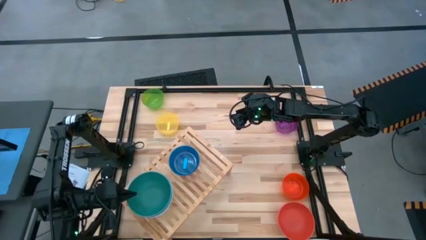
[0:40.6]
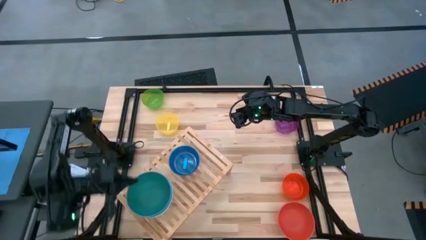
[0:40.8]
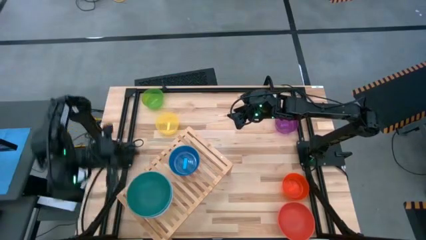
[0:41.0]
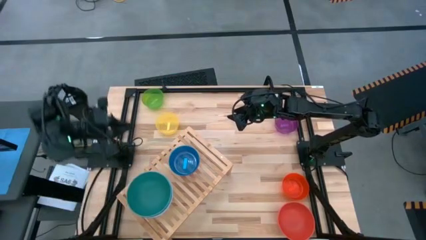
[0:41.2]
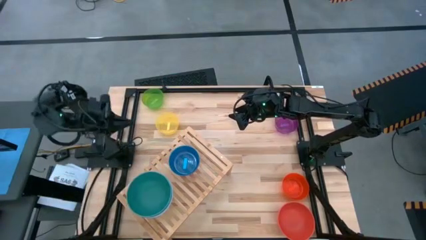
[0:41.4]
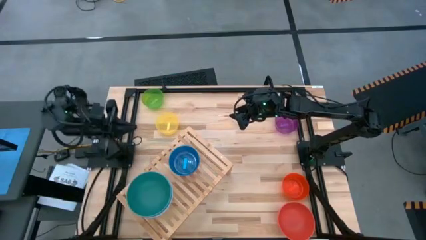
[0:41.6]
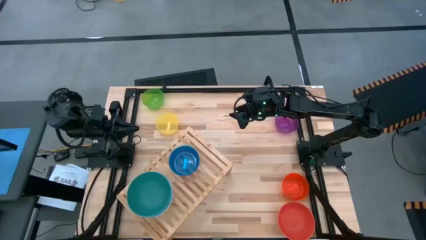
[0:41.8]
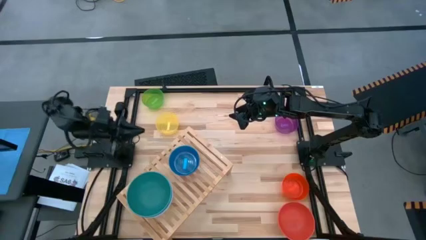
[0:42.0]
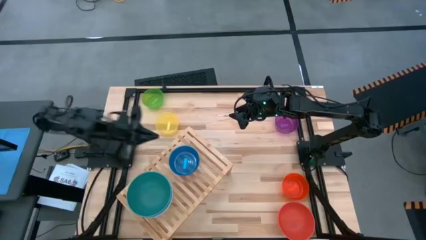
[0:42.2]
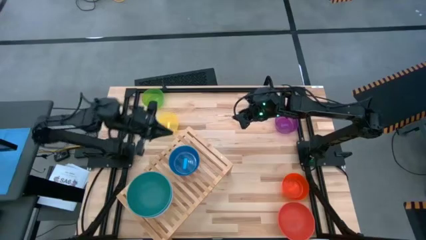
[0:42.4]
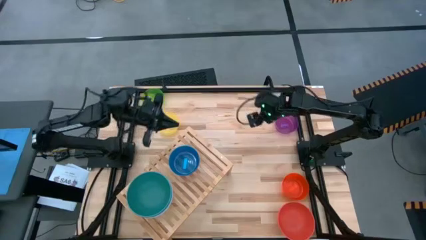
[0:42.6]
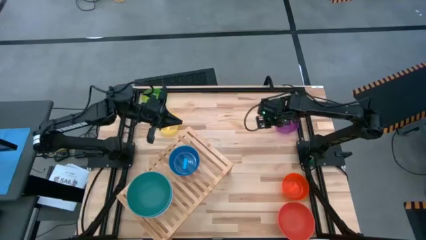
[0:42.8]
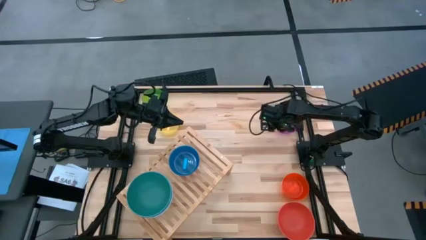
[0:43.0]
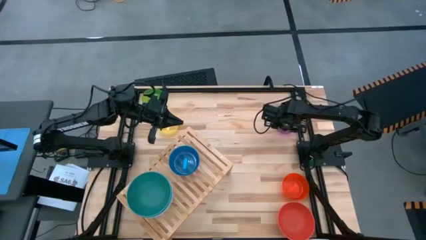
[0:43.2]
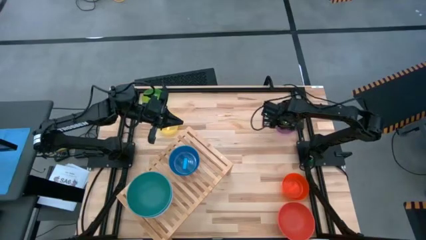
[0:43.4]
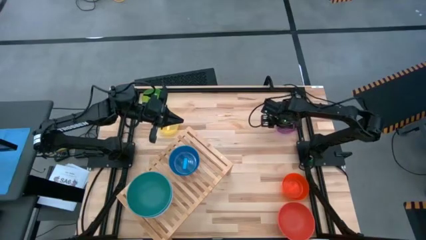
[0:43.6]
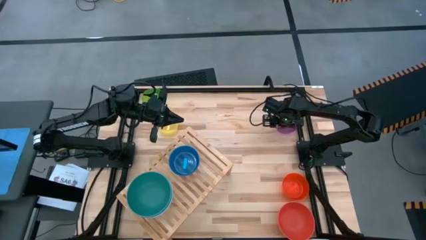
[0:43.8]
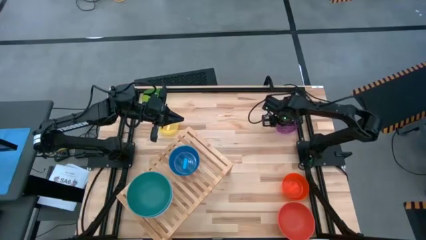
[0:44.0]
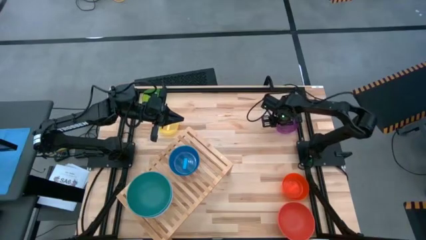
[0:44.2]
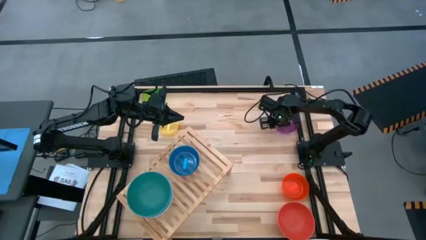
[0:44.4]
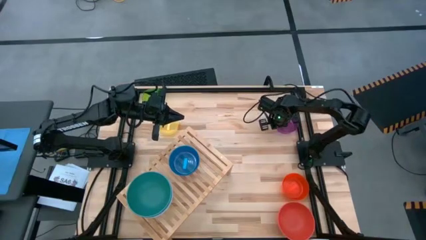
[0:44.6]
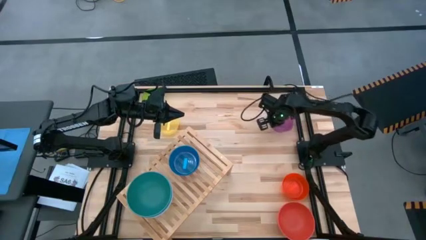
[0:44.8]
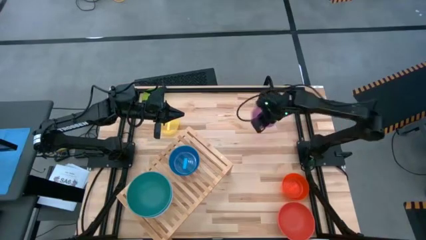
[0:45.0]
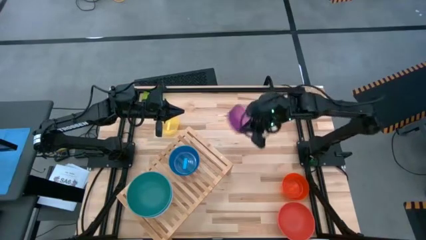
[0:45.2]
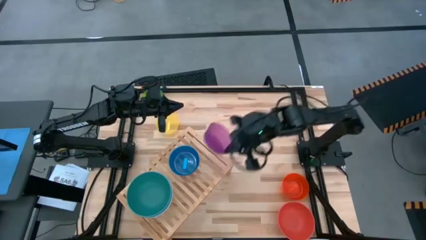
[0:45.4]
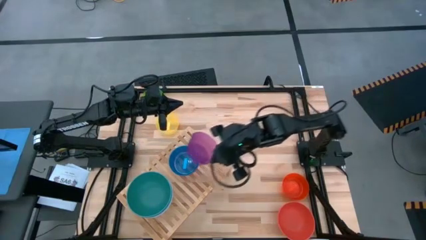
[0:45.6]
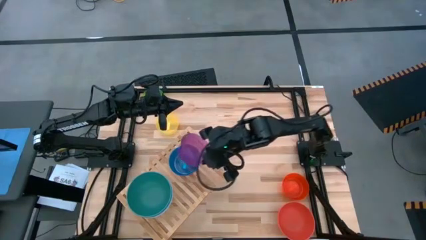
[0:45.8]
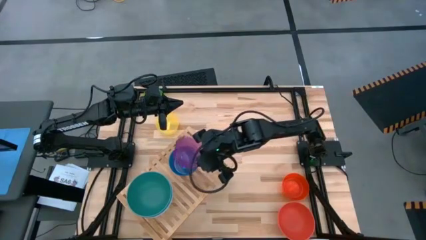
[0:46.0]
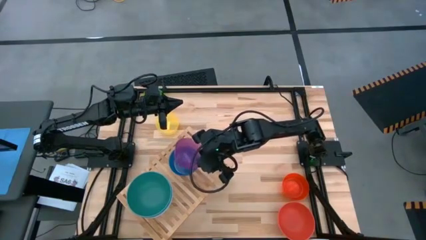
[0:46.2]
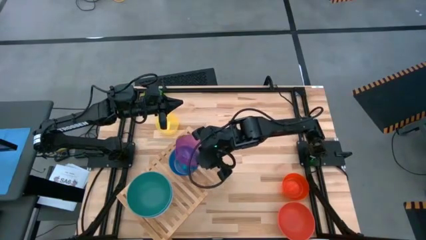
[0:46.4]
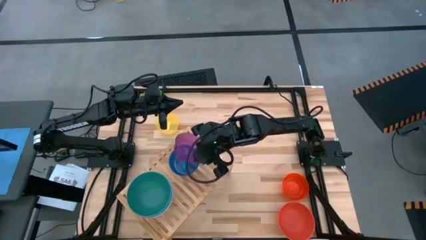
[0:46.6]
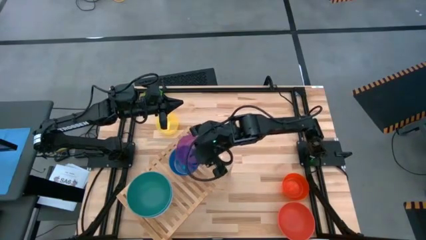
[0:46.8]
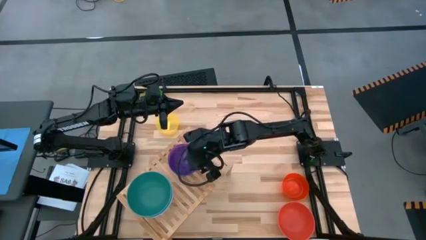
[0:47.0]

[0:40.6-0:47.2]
Task: Place and stack bowls onto a shelf
Stack the small violet bowl on the shelf on top of the small blue bowl on the shelf

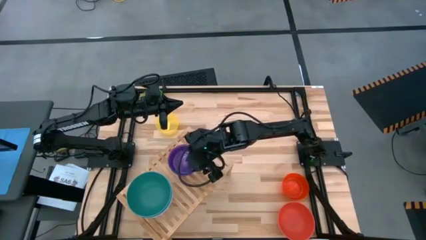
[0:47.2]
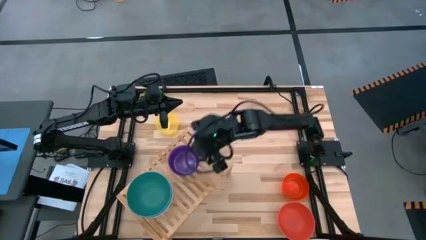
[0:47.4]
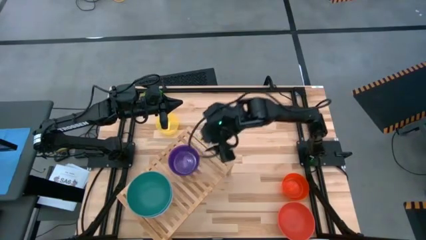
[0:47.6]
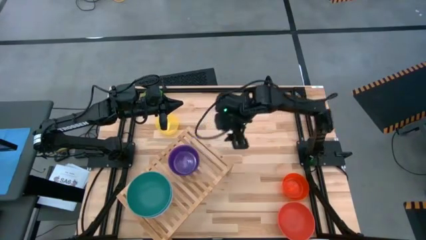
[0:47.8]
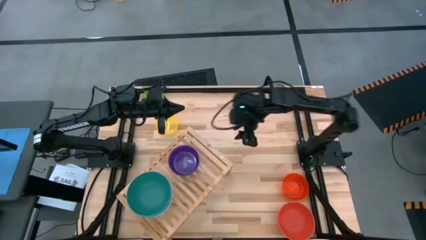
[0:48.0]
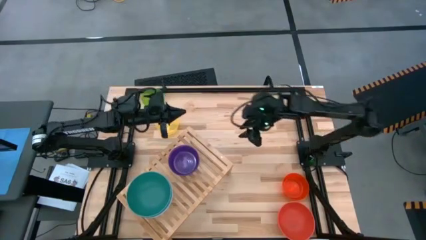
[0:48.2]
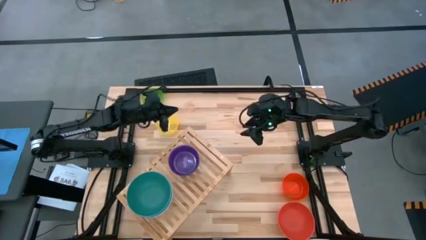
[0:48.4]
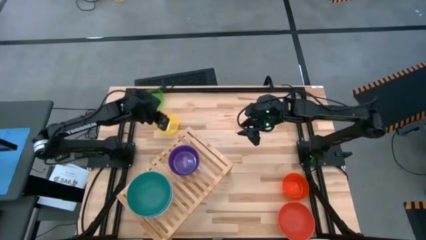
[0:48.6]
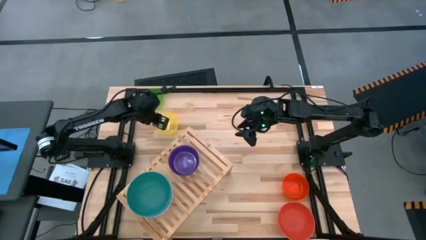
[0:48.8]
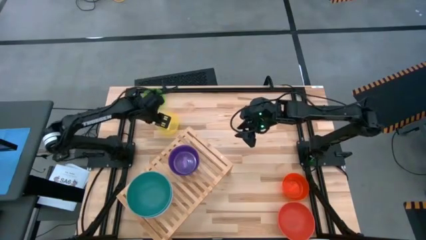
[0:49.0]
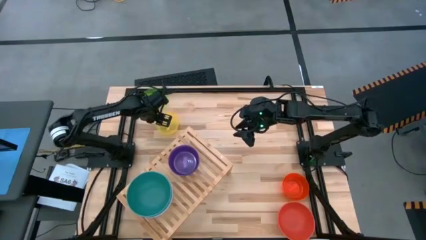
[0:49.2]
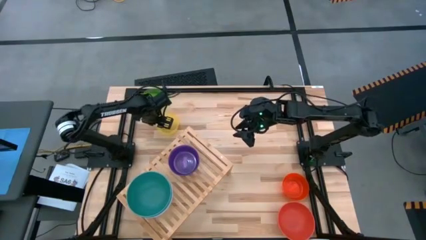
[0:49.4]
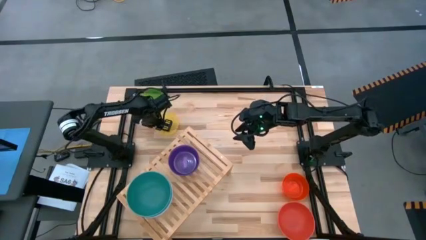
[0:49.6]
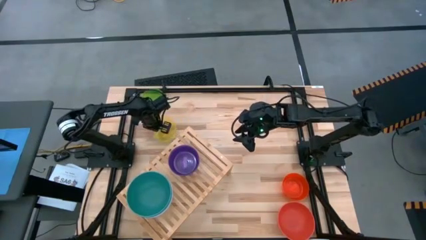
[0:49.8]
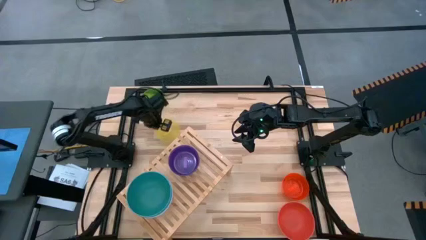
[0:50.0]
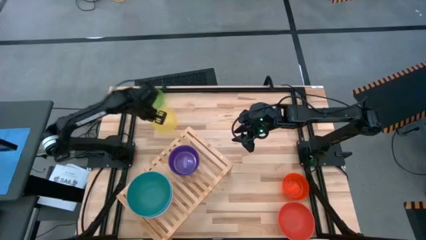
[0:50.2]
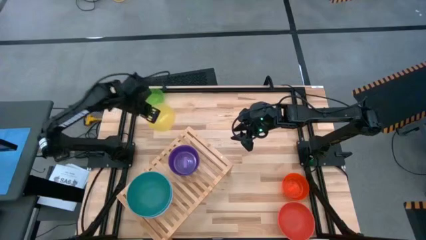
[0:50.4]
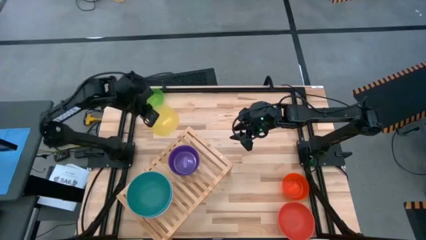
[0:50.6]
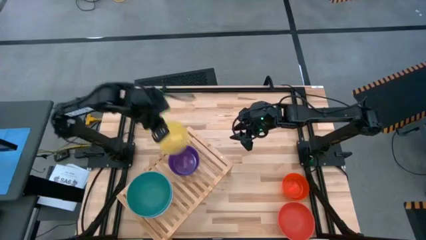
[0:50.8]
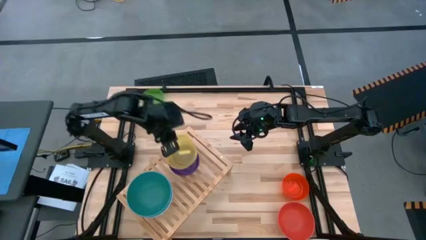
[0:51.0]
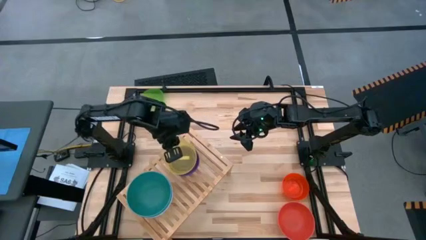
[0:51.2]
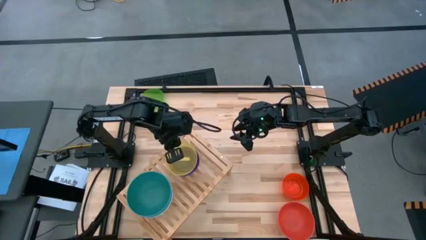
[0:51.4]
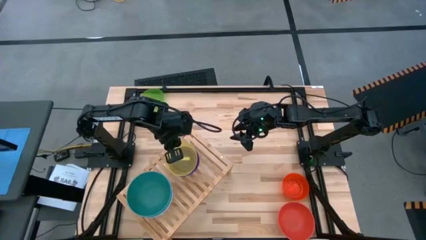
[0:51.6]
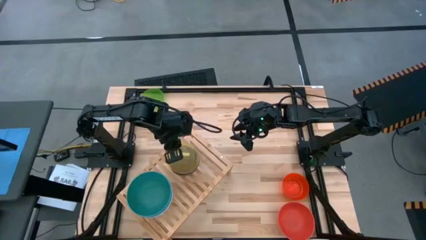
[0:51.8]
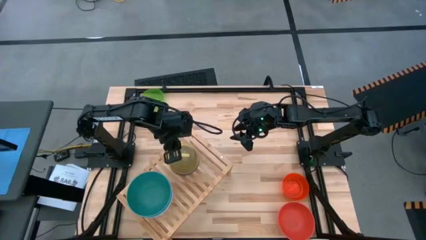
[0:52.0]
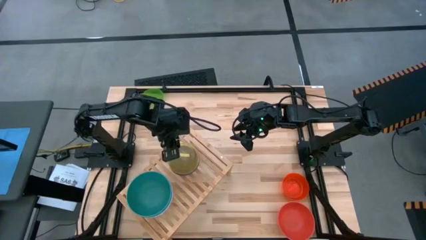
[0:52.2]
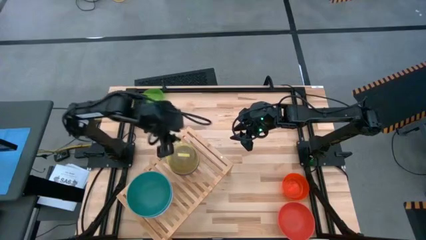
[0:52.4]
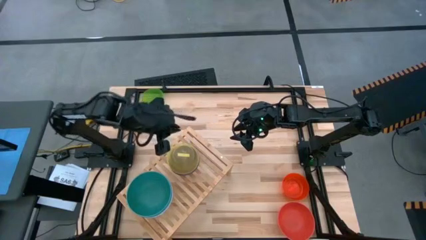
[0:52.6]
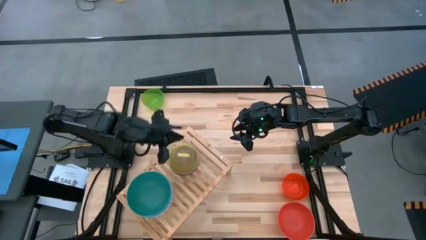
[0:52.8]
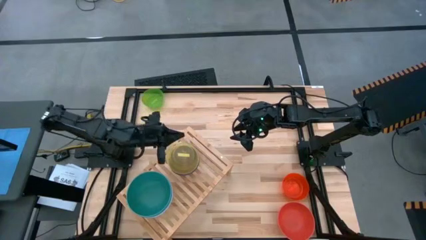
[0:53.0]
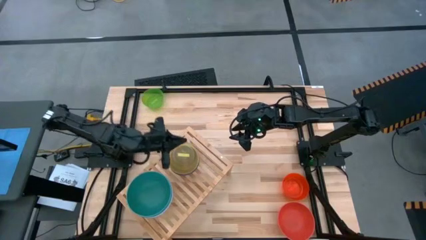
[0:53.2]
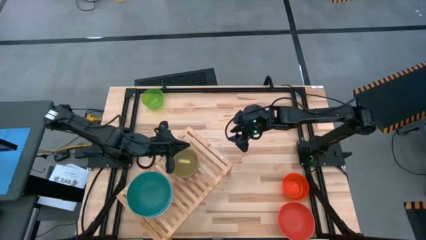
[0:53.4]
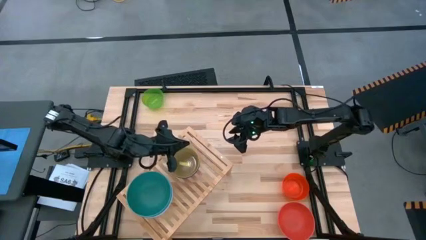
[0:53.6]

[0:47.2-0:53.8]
Stack the small yellow bowl on the shelf on top of the small violet bowl on the shelf

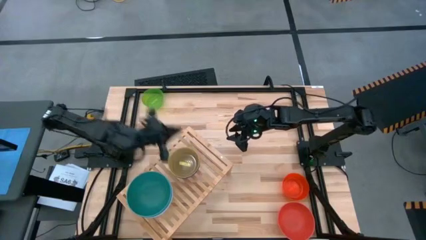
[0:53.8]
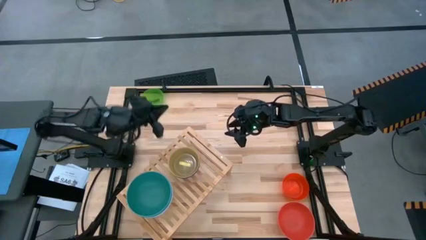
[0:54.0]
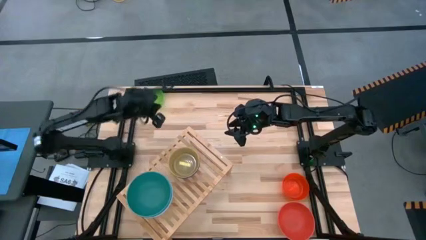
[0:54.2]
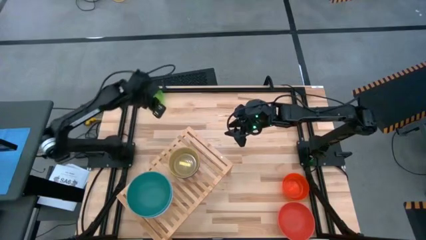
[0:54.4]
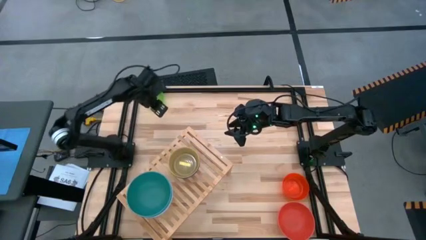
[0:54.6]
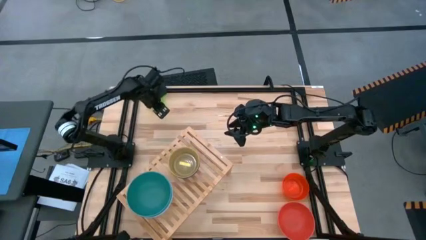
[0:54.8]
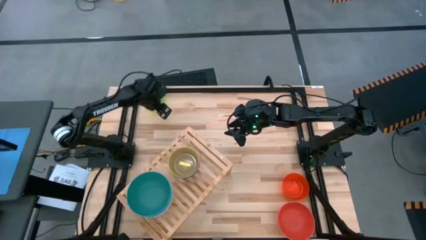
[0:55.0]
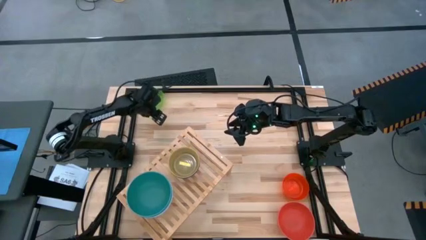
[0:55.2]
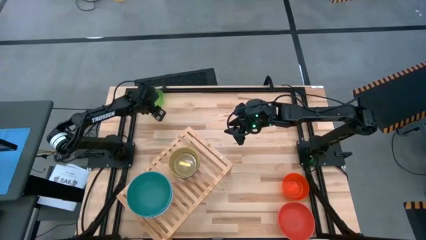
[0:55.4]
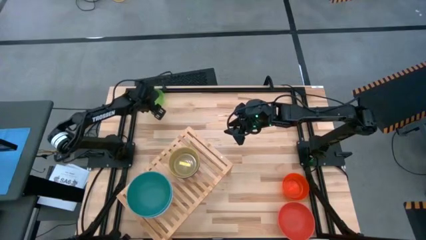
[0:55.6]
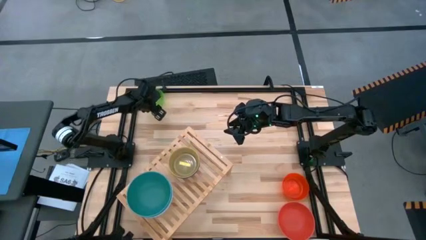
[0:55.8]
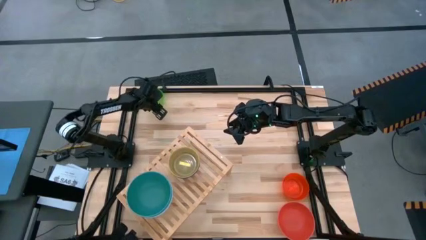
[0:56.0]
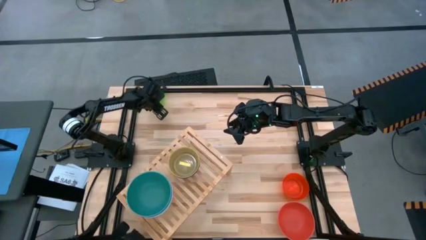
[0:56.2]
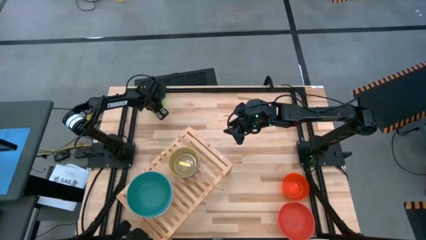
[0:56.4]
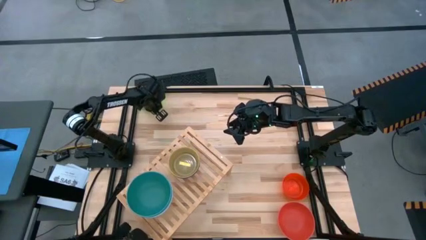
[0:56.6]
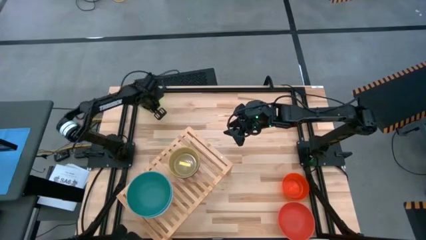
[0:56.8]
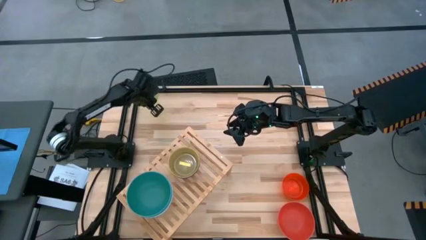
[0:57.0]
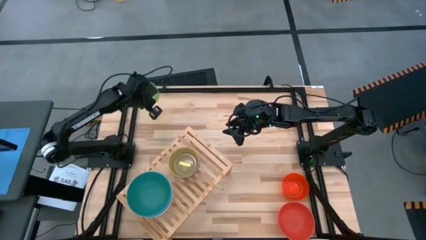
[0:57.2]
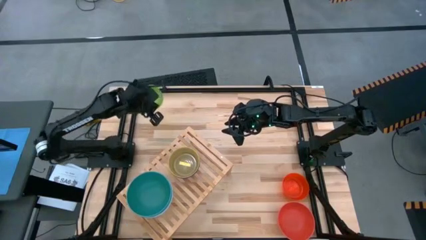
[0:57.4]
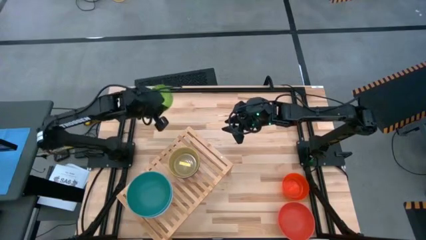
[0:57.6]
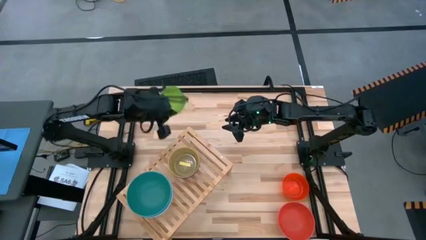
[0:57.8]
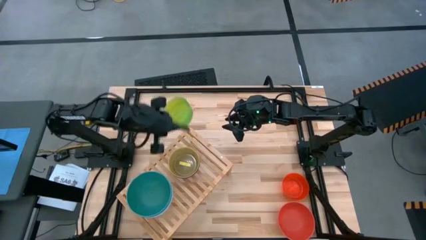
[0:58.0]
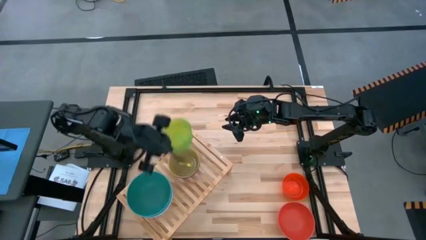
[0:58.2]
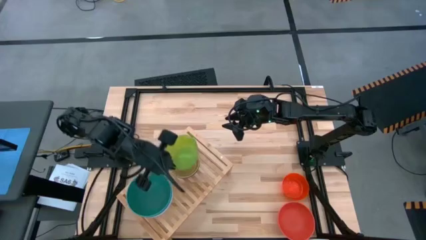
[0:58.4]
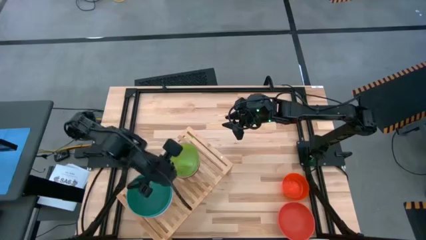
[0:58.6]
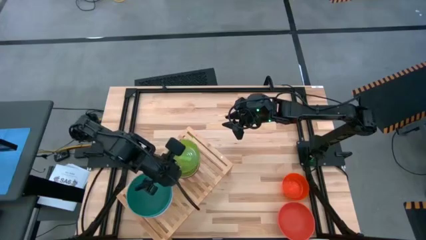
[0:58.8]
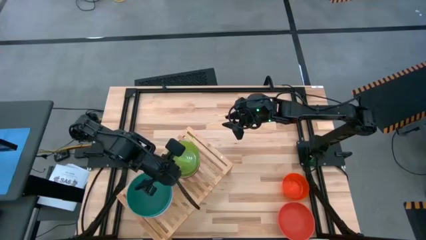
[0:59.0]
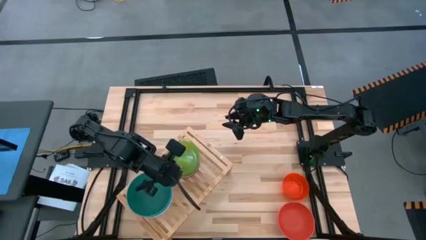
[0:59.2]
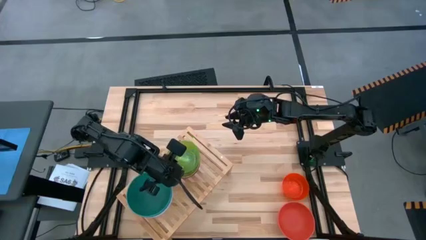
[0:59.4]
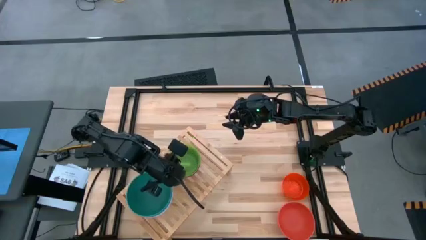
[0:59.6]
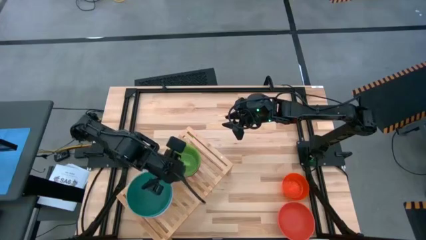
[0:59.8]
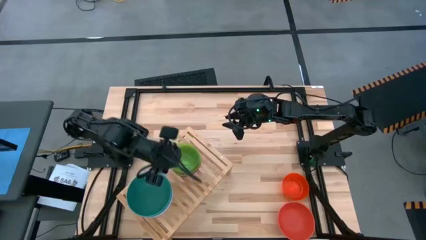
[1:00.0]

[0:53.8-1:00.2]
Stack the small green bowl on the shelf on top of the small yellow bowl on the shelf
